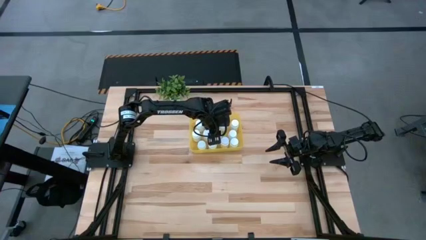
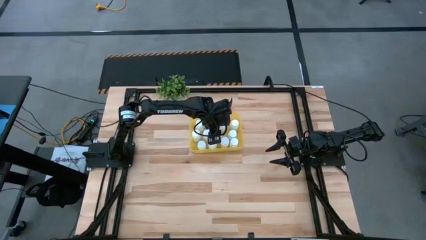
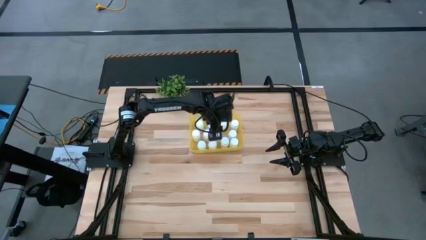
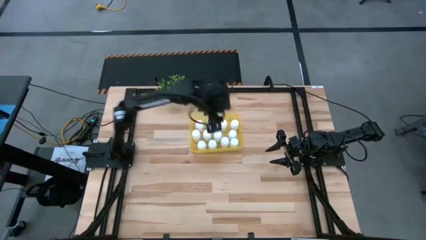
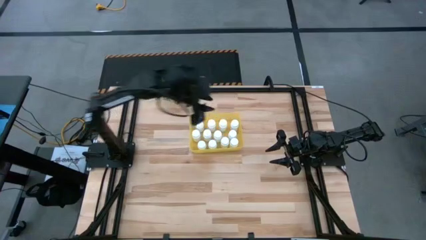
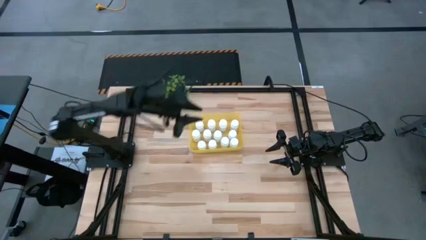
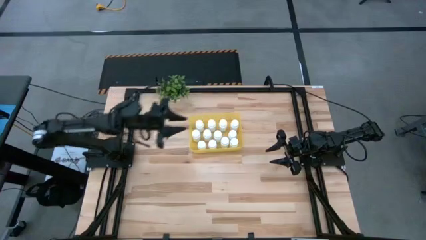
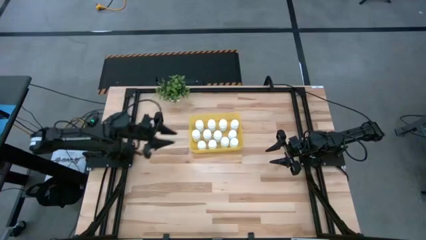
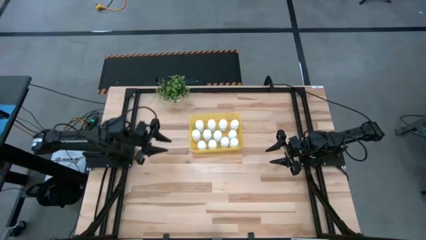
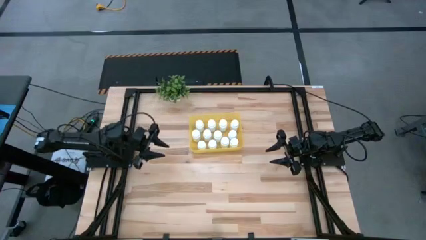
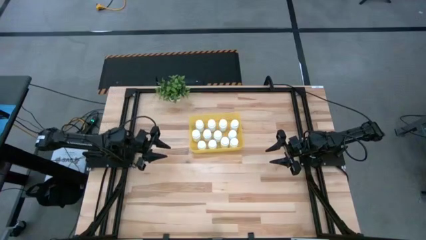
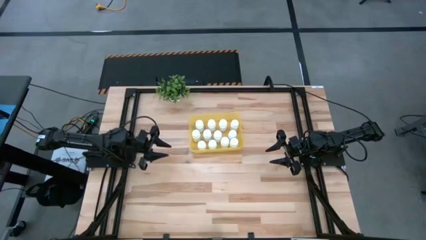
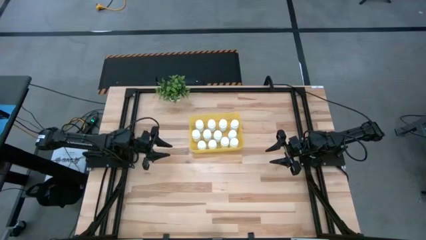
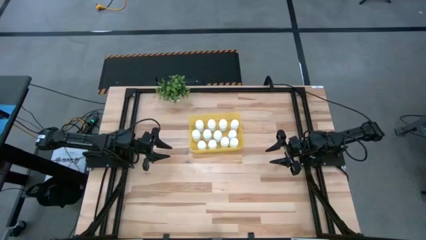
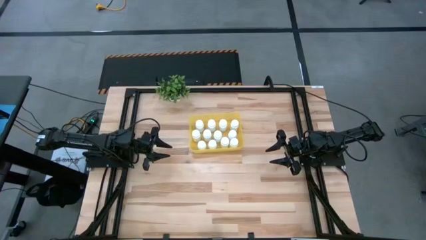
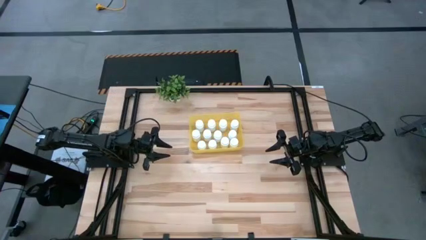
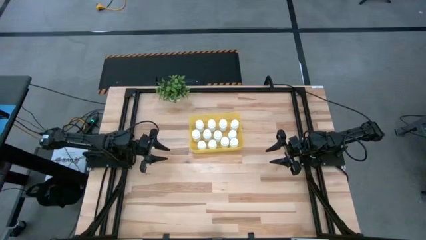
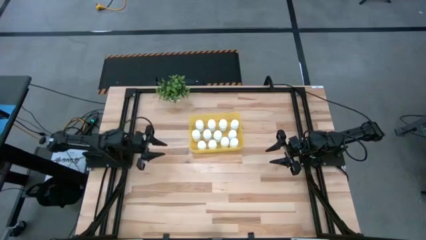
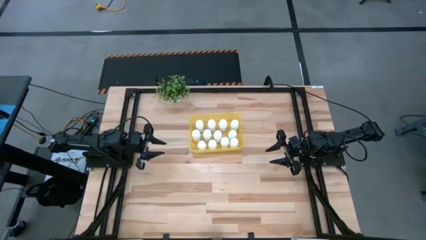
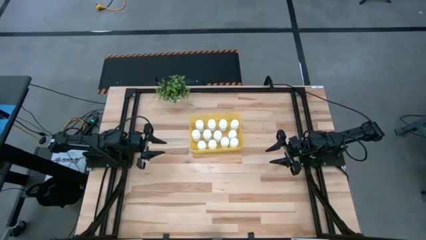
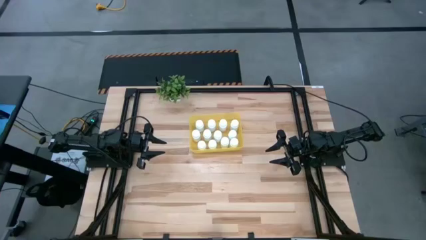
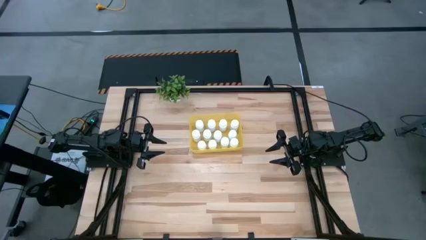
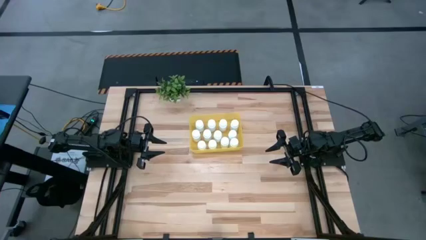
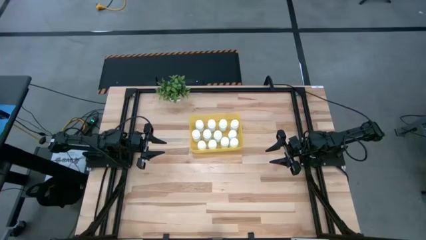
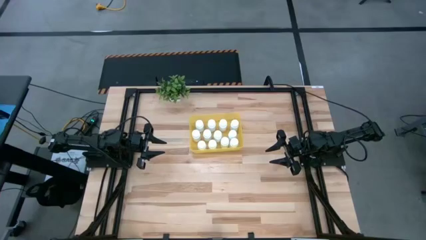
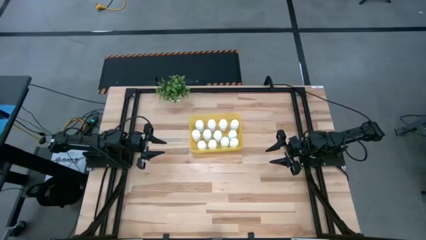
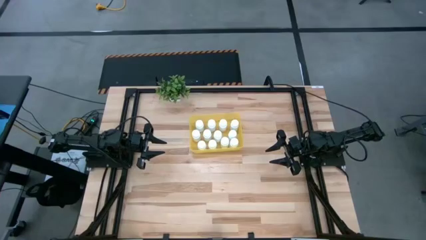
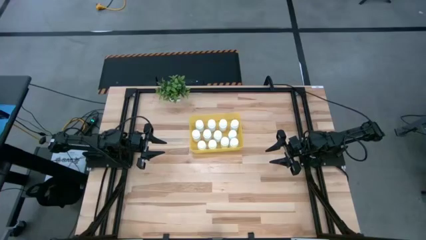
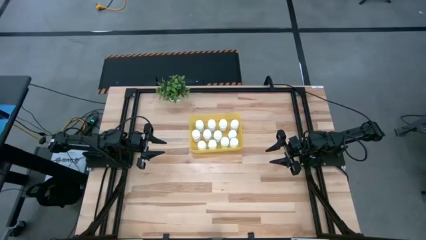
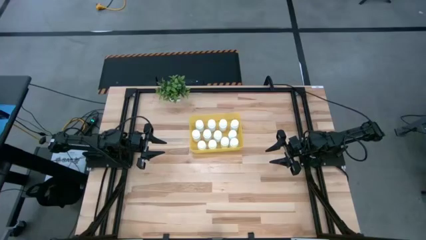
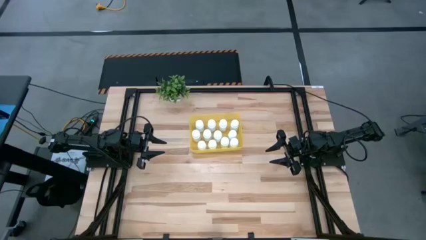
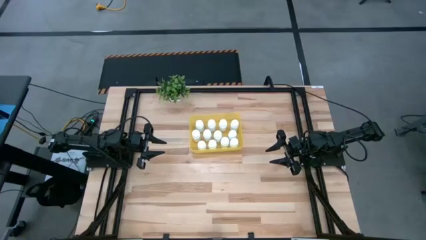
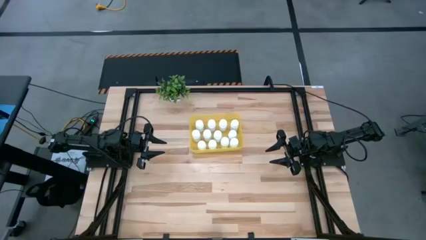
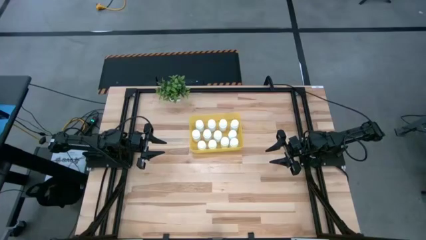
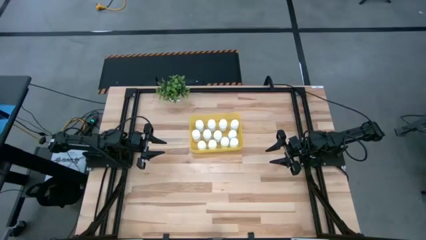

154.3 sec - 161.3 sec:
Task: Pick and place pill bottles into a basket
Return to Home Position
